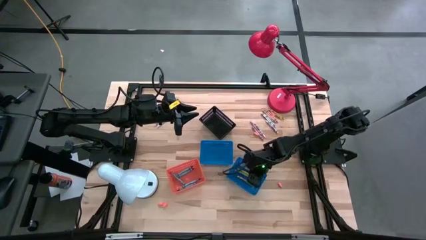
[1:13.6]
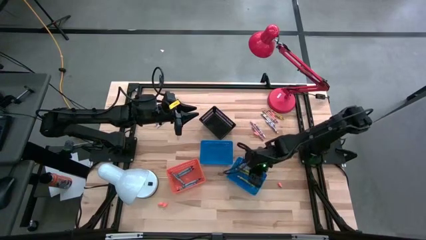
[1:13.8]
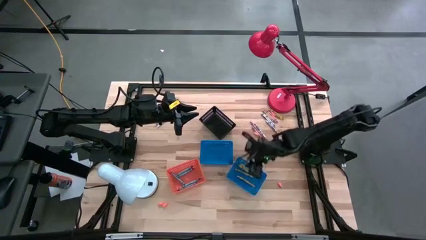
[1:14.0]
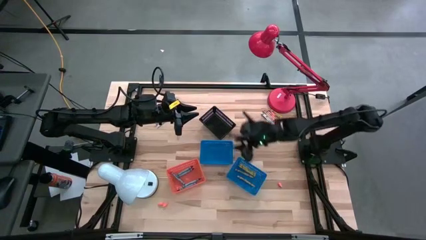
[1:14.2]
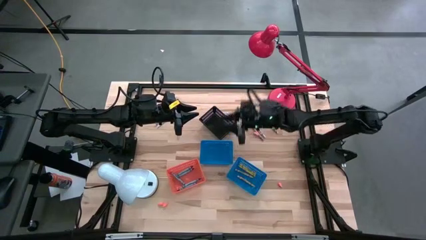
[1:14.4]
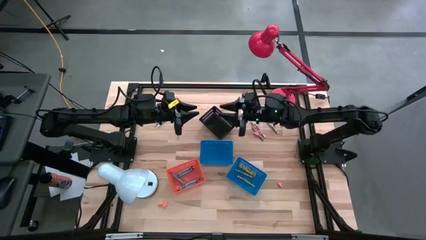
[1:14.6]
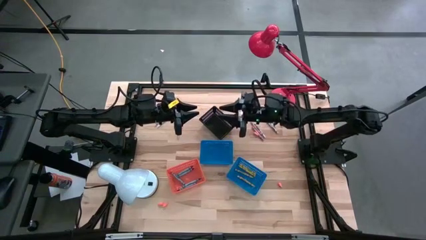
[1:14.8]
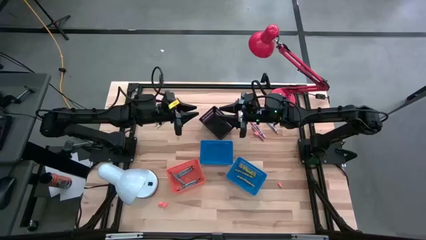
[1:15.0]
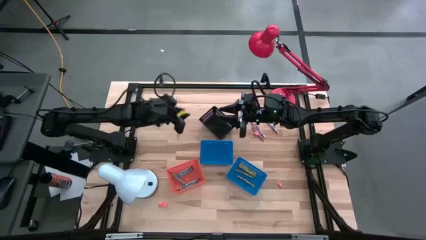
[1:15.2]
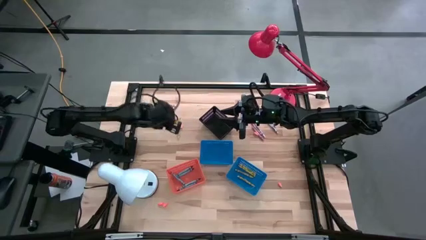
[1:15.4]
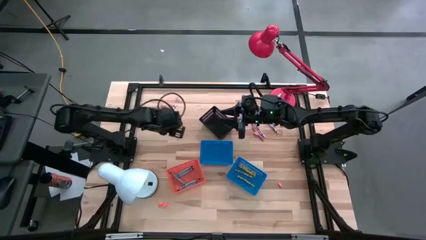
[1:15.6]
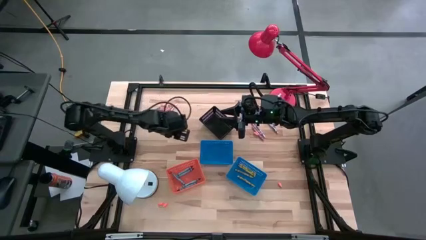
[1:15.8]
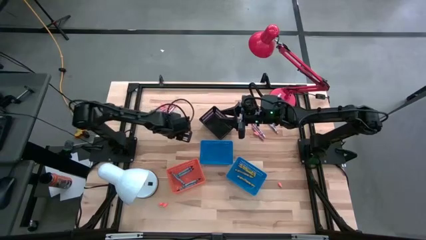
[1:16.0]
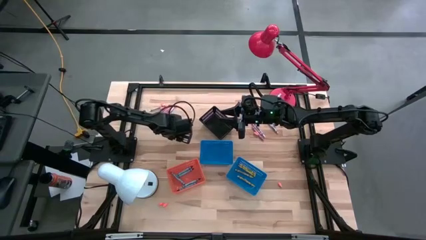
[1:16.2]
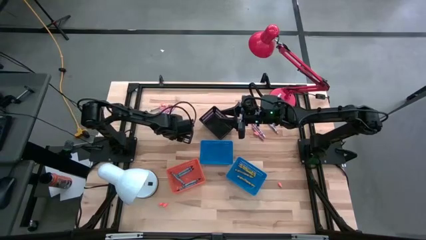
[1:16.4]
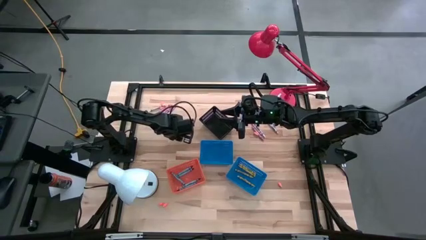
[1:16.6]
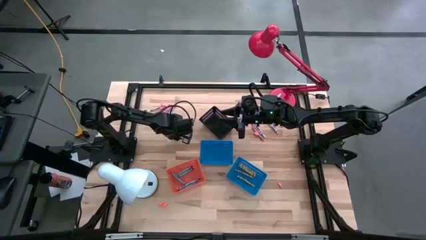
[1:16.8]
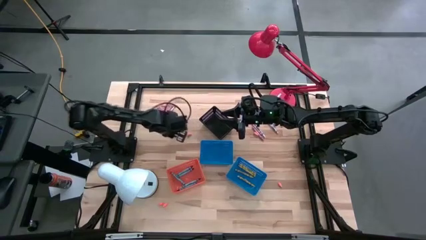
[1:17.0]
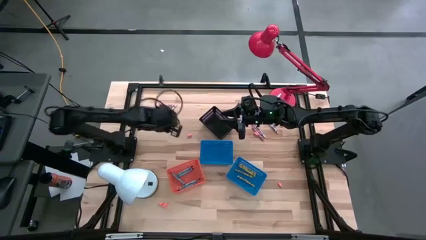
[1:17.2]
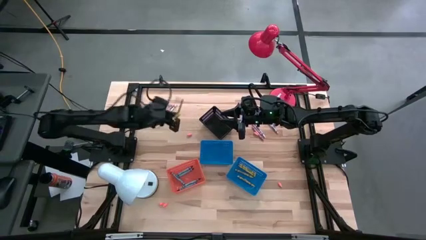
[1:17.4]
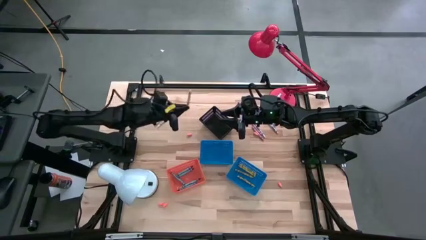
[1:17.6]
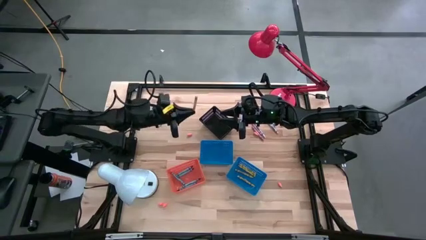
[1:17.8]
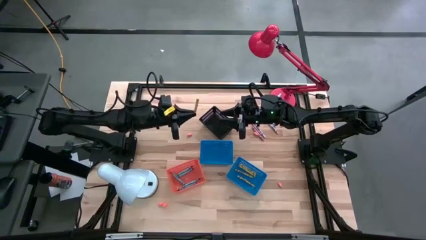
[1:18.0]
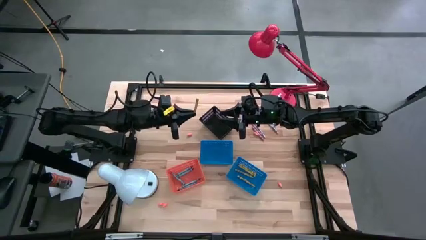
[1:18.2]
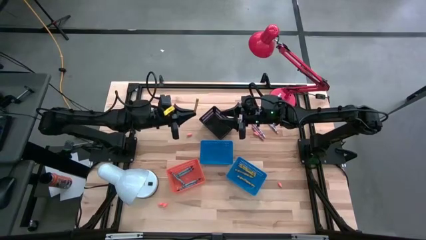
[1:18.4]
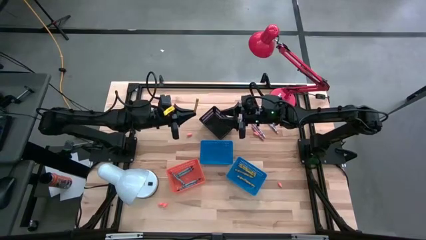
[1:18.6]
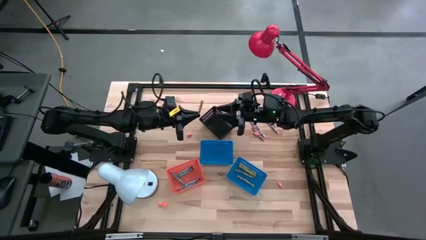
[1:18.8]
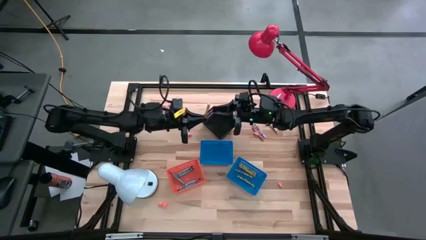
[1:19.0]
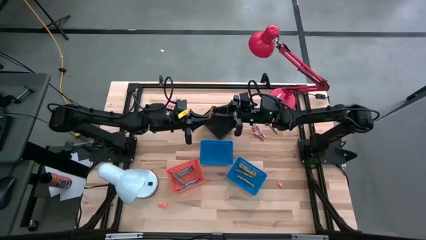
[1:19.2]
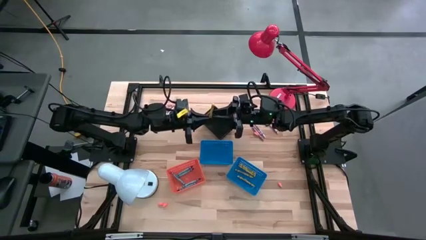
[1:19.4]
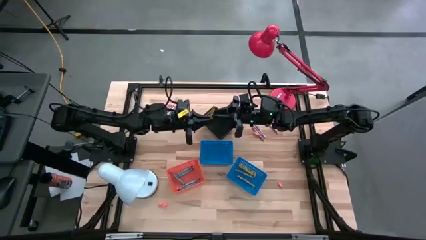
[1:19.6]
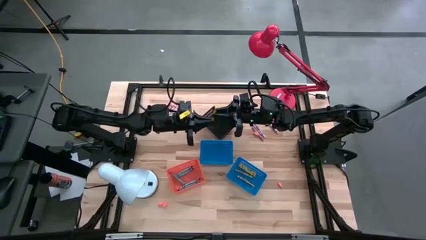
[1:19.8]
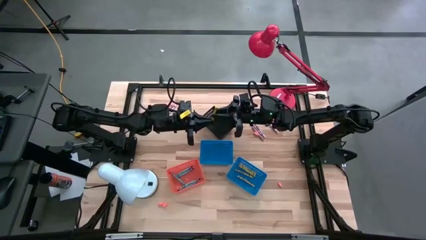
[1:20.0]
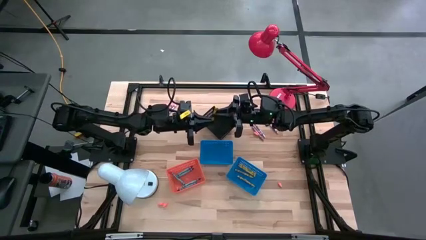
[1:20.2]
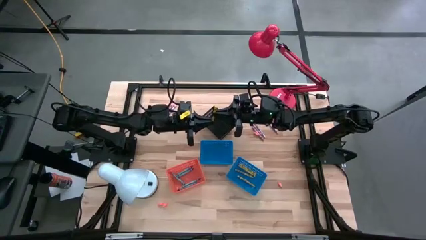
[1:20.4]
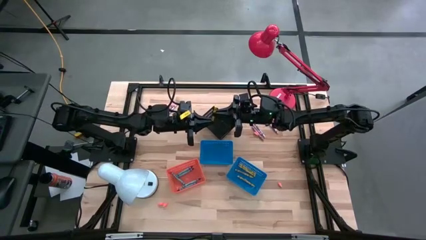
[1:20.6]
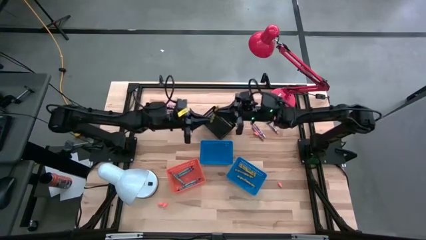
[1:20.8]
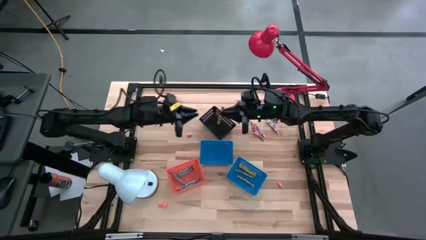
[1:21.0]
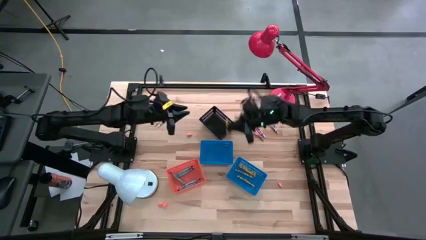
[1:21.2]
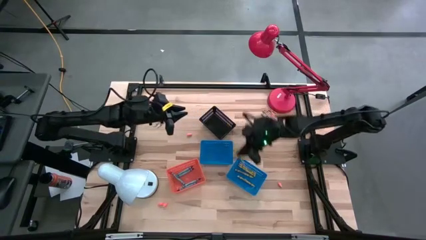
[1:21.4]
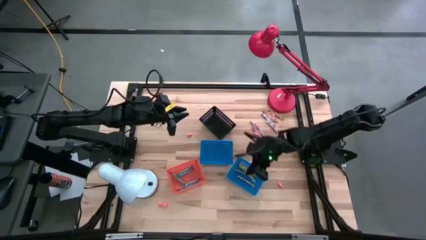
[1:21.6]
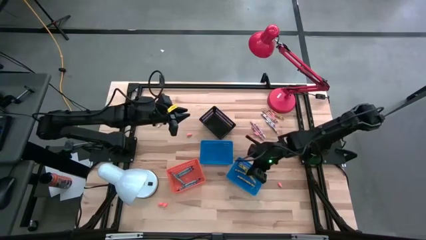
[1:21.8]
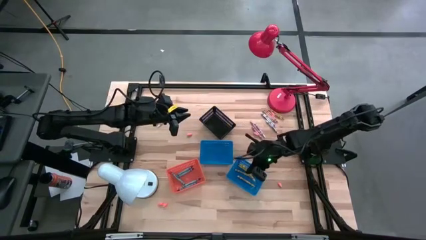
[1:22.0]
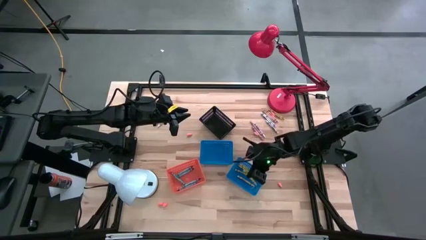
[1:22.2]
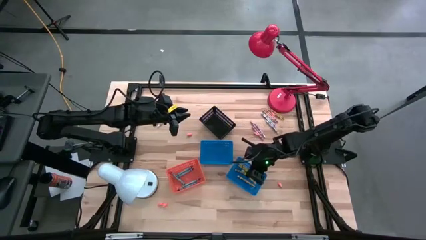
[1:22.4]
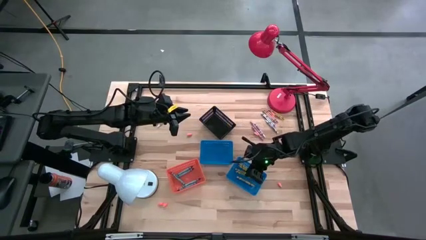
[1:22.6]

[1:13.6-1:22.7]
Task: Sort crayons
Put the yellow crayon into the right blue bin

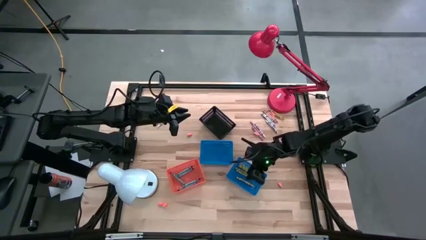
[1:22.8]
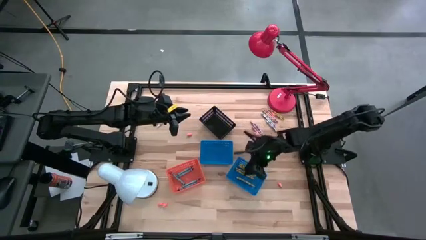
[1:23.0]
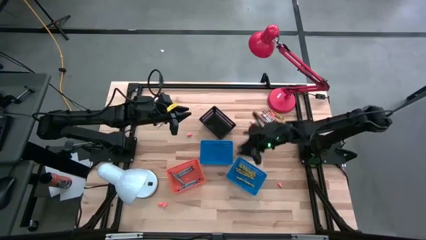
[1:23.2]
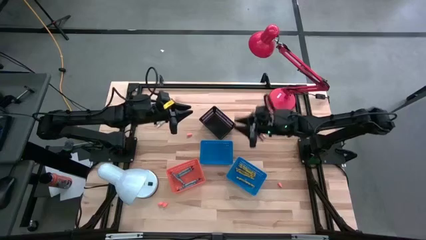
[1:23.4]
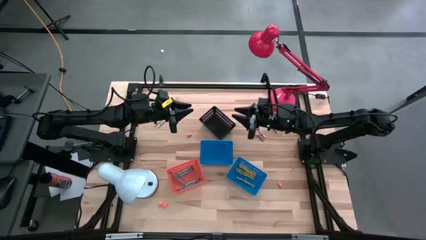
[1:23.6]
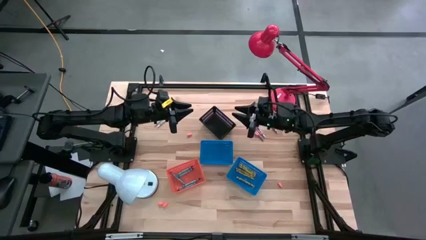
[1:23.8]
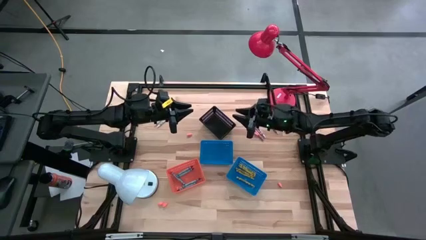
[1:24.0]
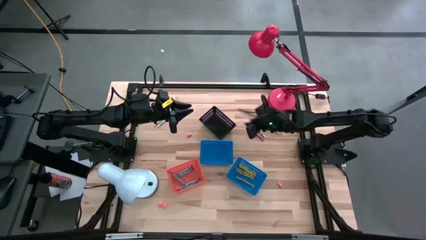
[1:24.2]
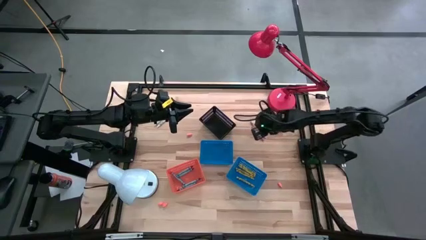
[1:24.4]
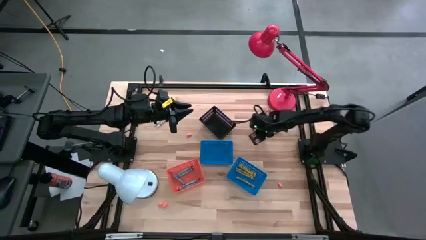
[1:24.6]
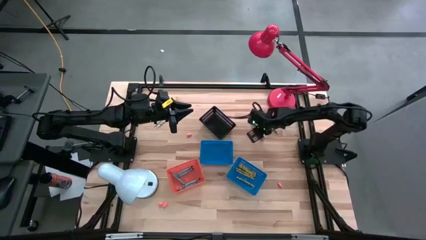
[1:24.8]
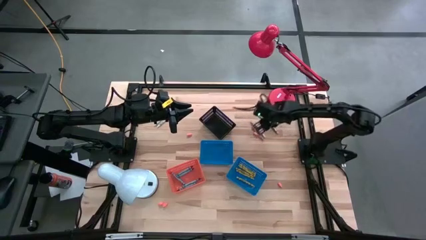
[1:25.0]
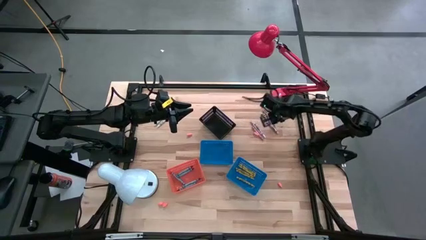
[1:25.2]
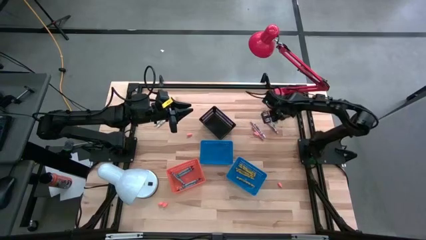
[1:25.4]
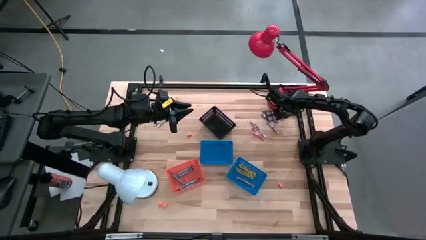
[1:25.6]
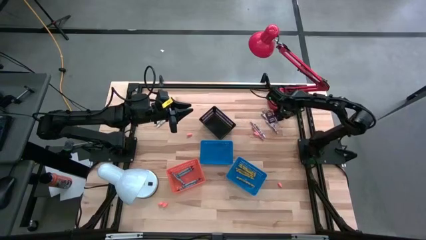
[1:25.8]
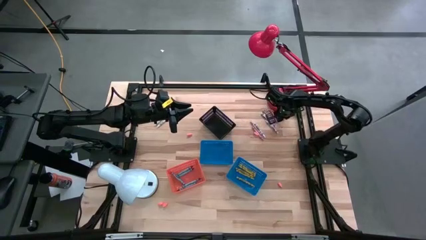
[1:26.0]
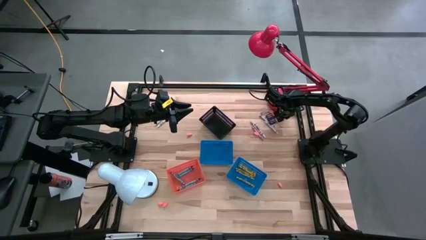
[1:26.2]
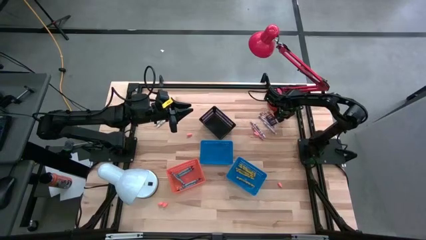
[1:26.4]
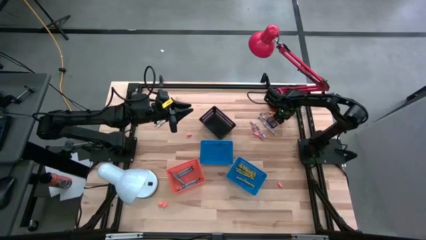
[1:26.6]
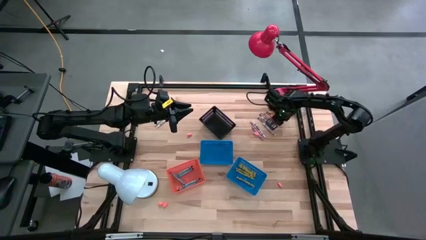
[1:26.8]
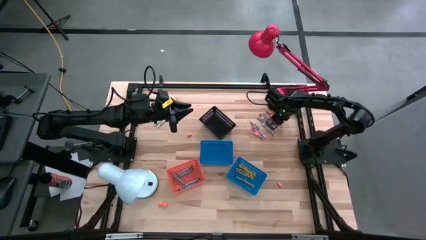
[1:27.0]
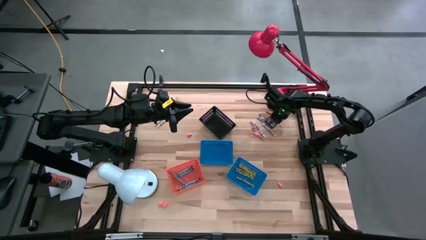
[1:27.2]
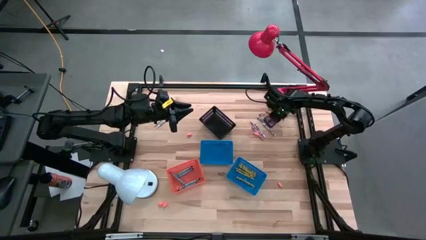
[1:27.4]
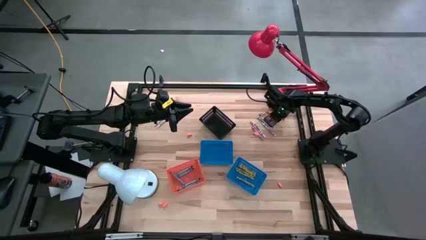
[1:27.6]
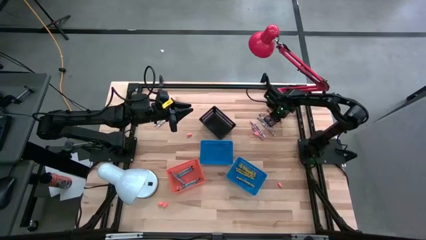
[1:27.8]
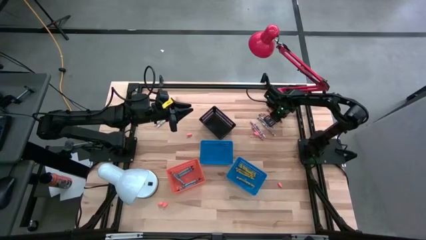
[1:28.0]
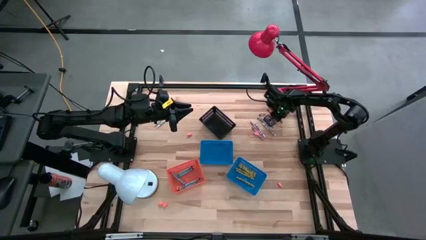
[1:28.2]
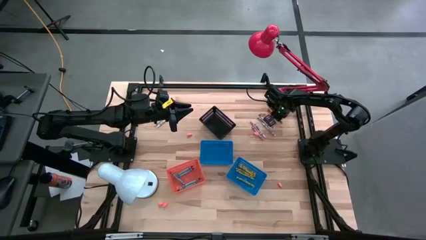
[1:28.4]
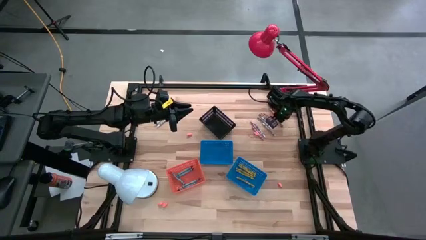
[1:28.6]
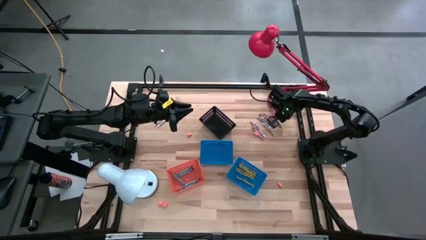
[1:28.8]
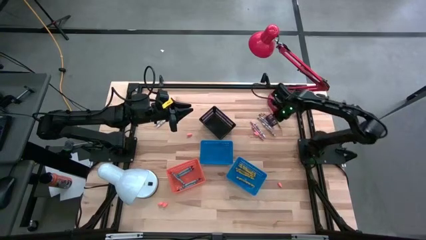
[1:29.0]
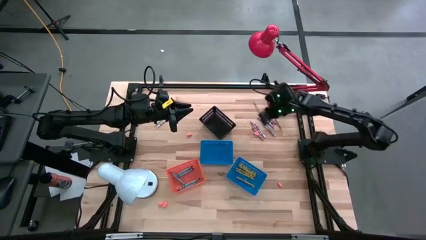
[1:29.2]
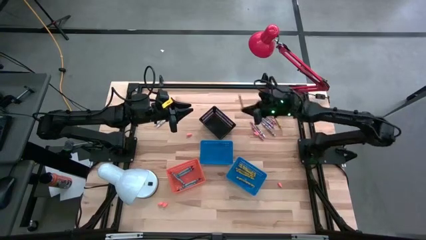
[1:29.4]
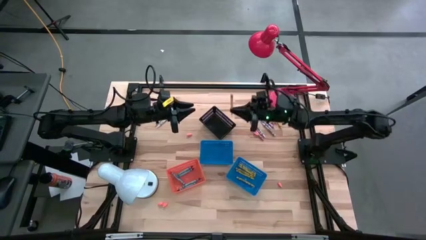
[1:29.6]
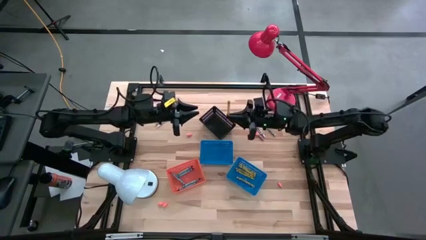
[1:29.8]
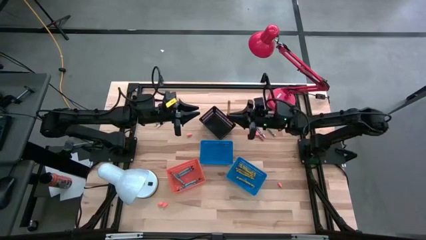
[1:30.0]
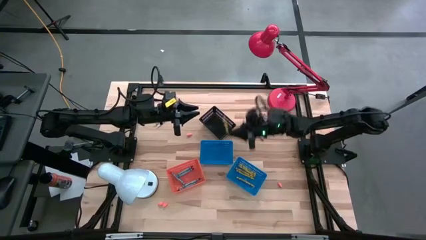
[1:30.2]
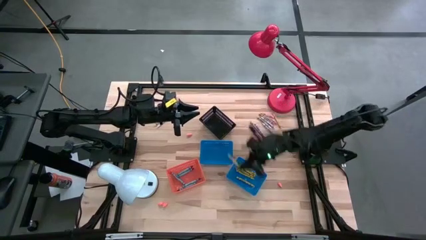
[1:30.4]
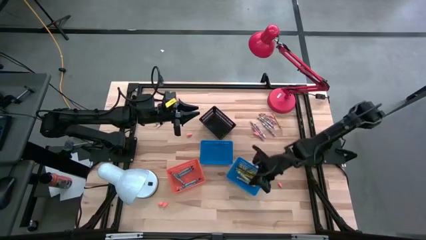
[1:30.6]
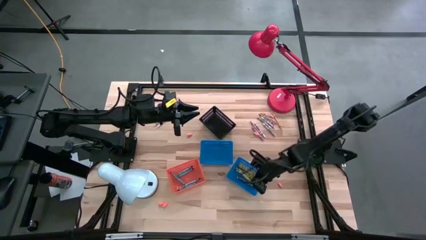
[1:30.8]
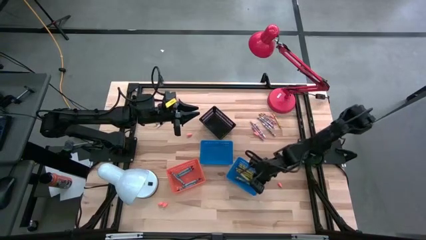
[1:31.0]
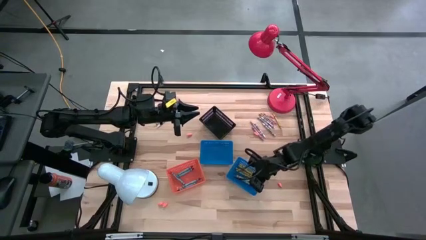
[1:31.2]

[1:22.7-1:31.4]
Put the yellow crayon into the right blue bin
